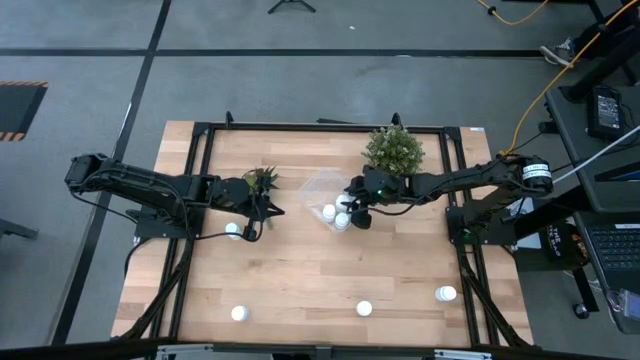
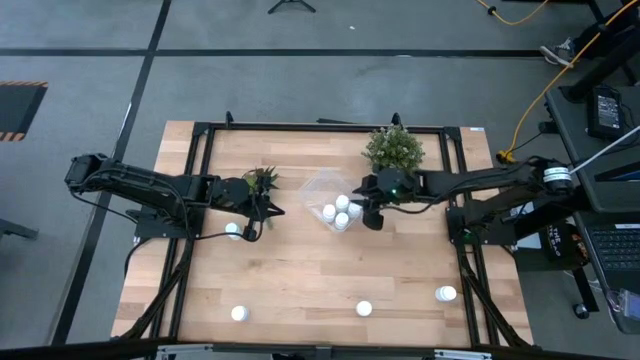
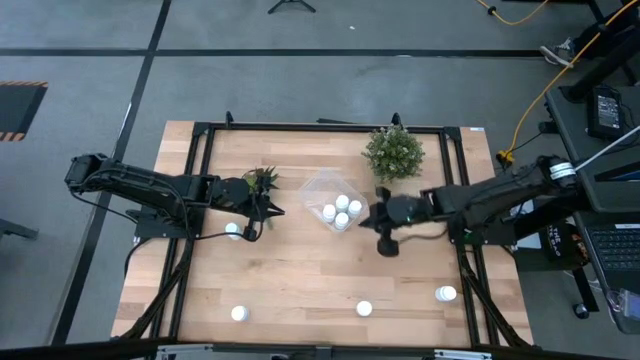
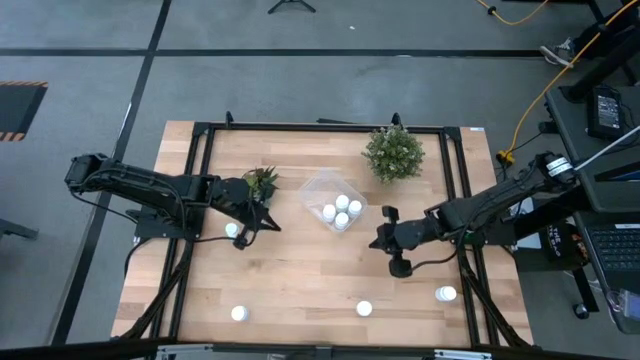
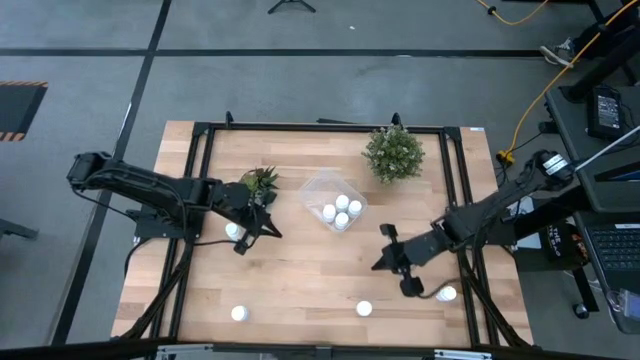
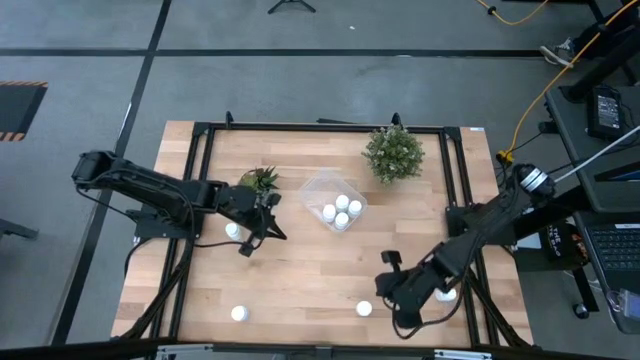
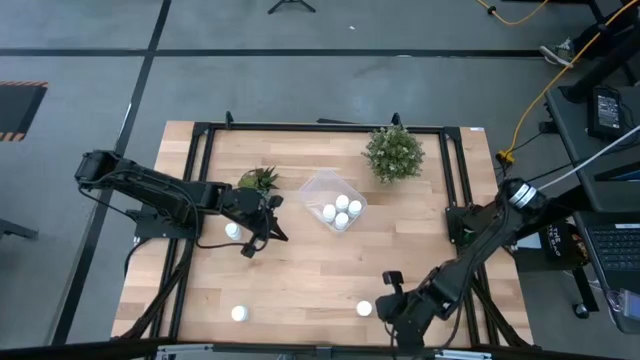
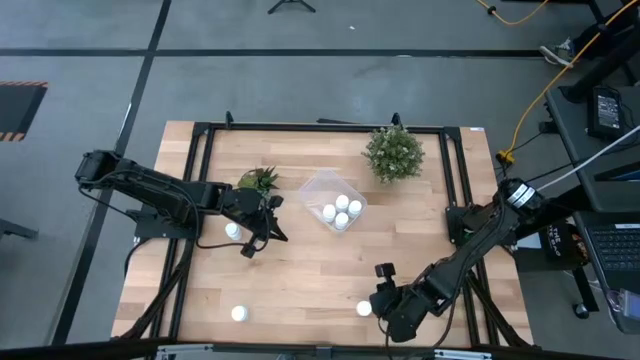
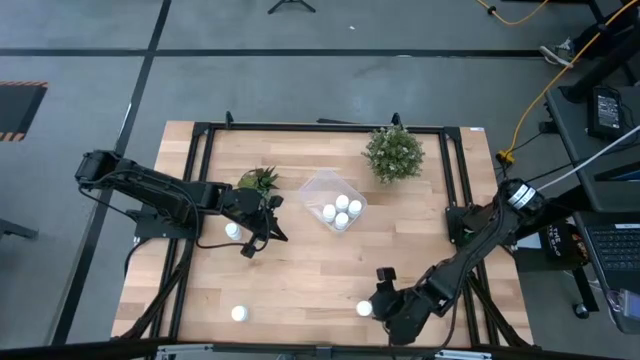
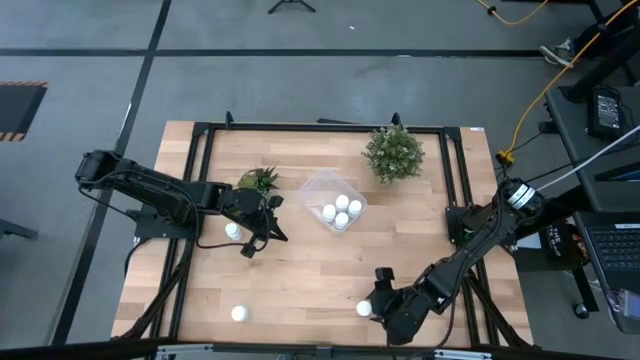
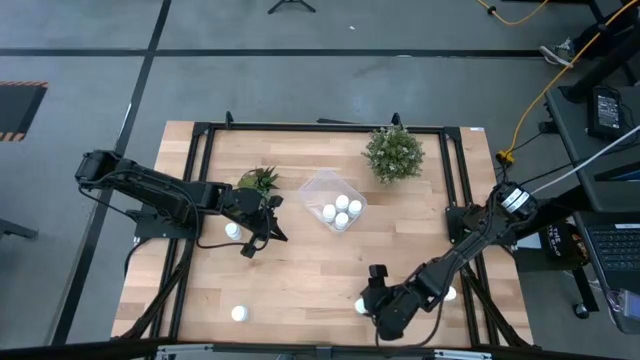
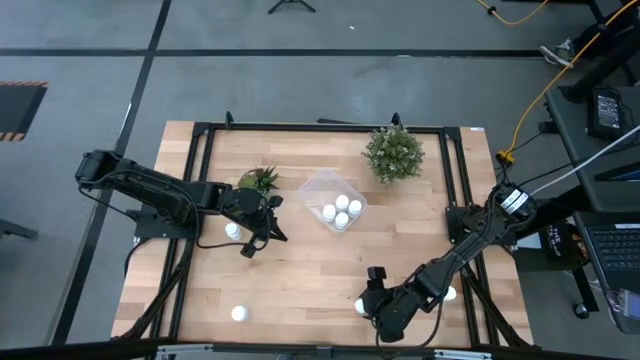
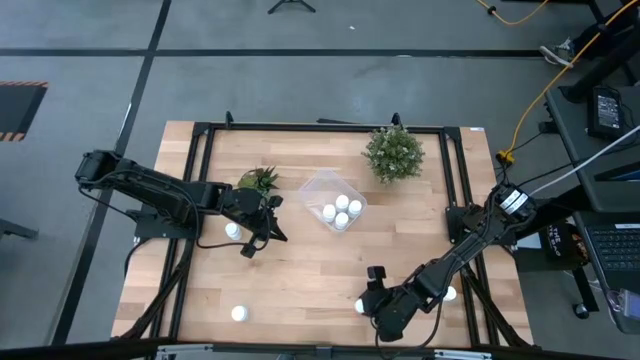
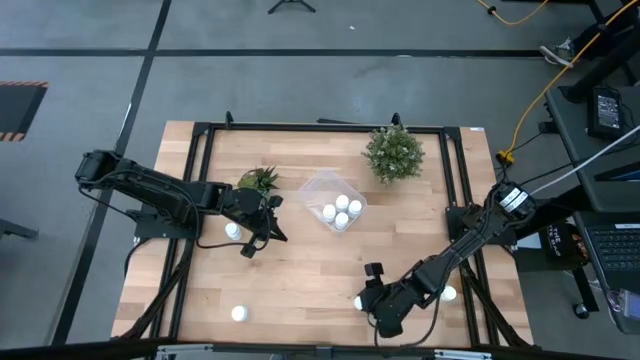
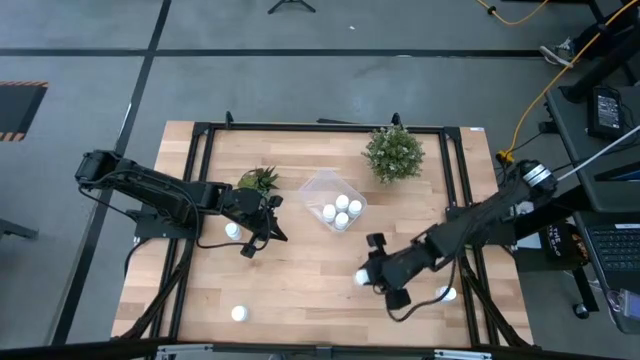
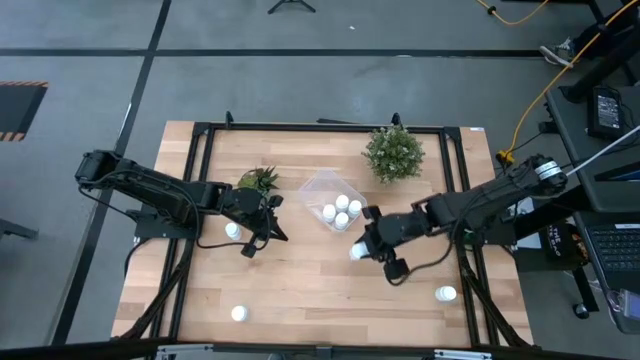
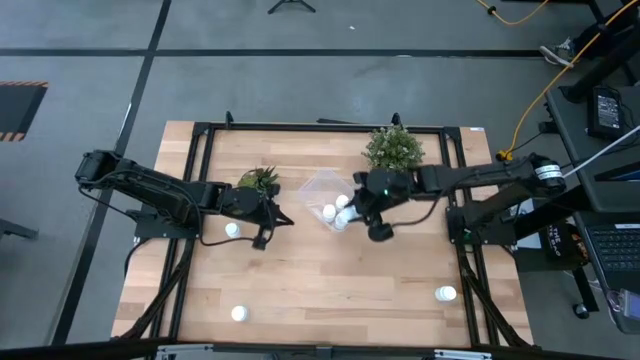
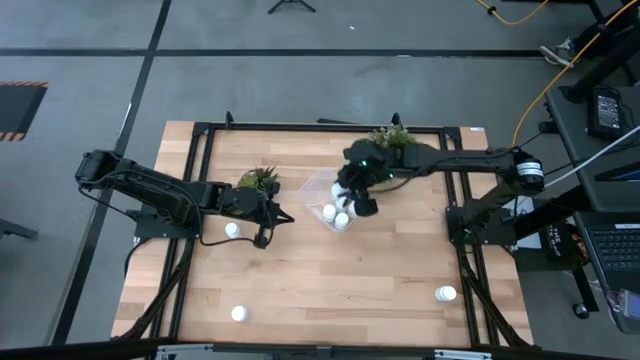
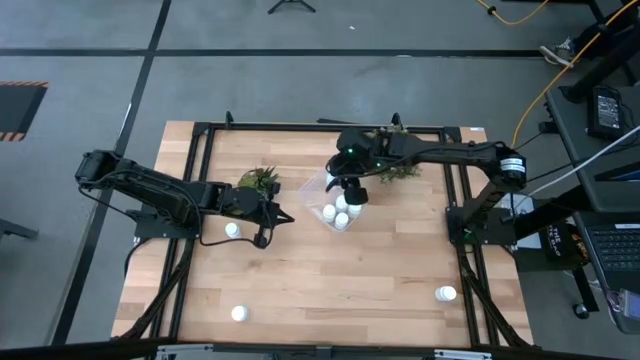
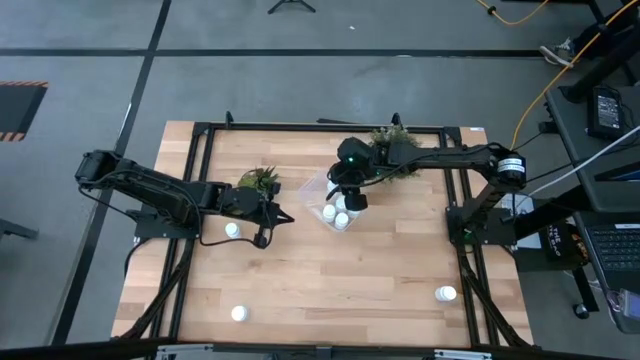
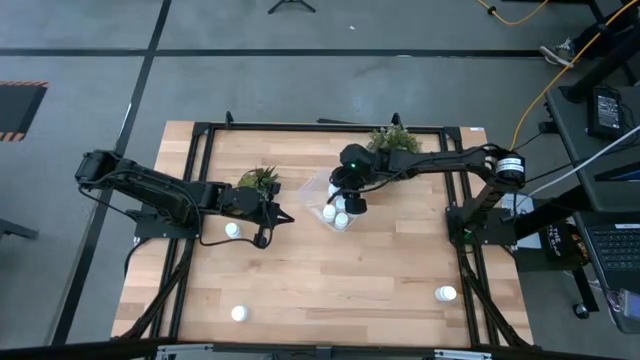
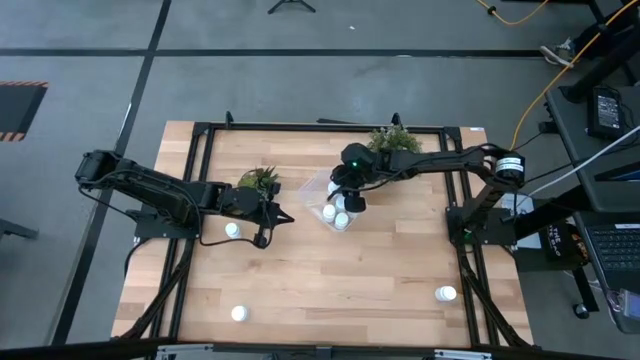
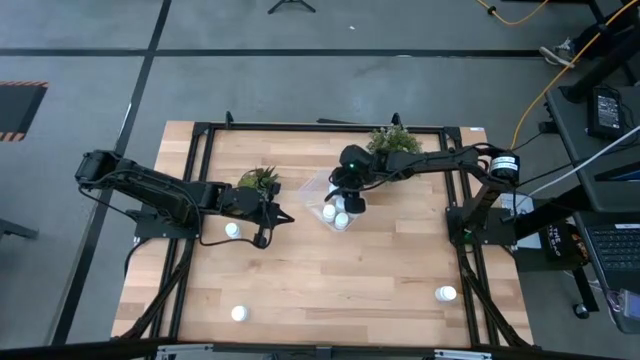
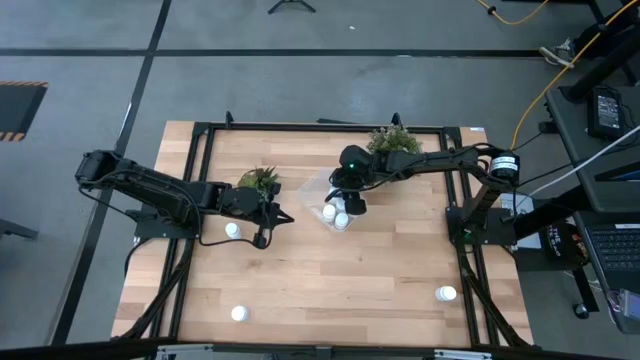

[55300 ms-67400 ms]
Task: Pick and place pill bottles into a basket
Put the pill bottle into the transparent bin

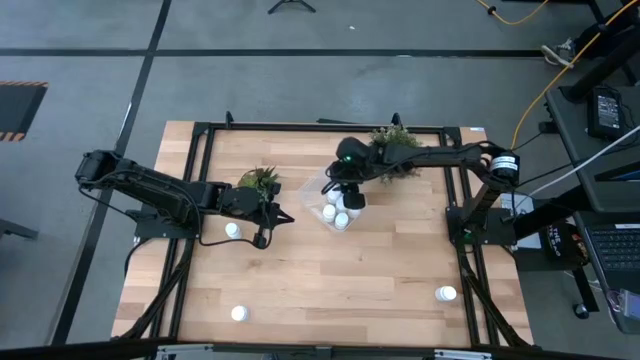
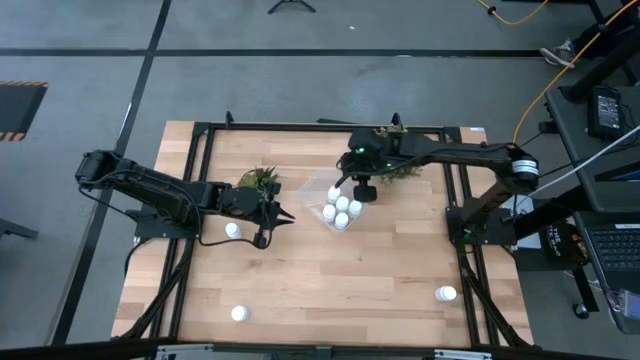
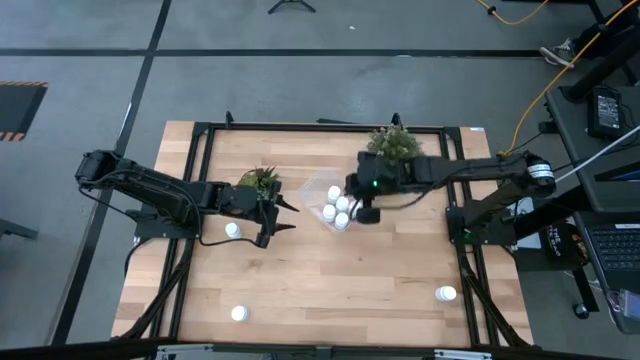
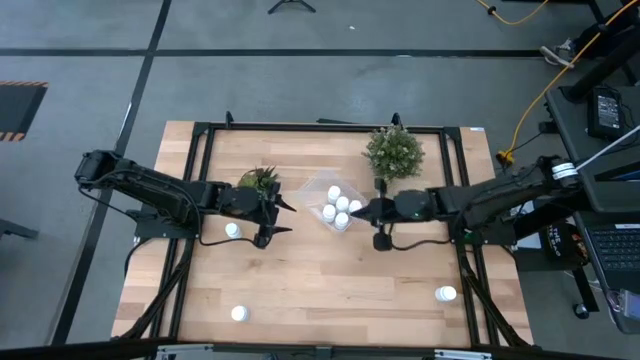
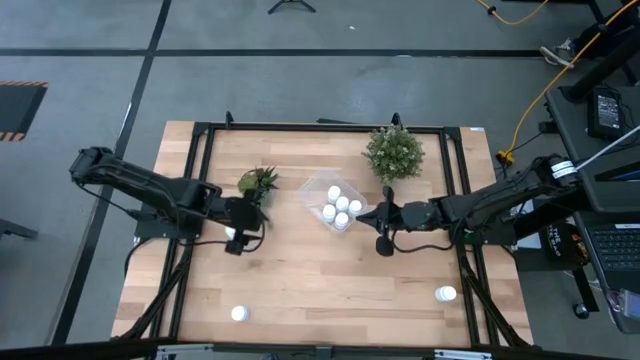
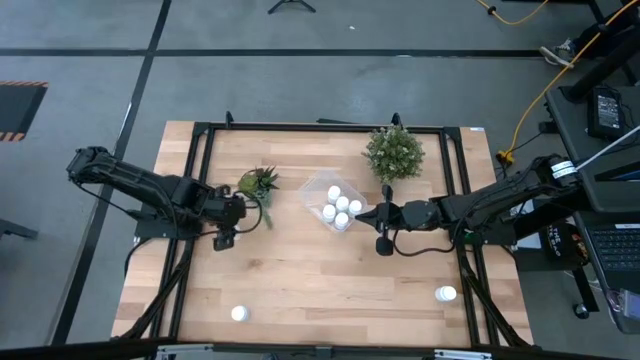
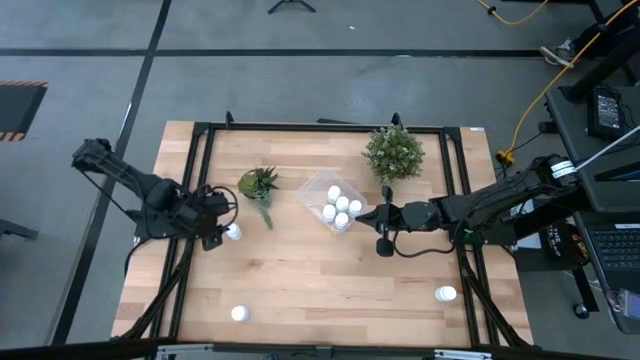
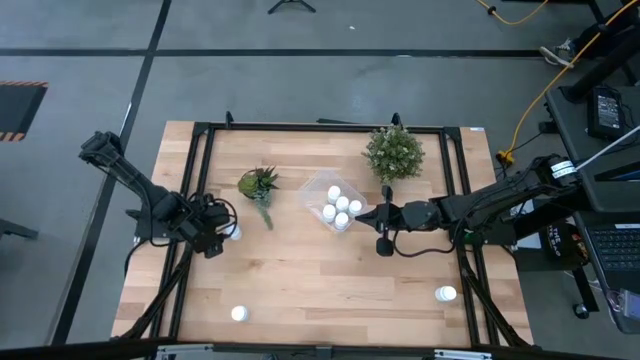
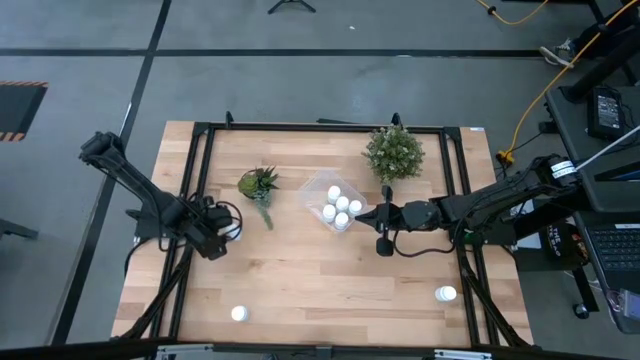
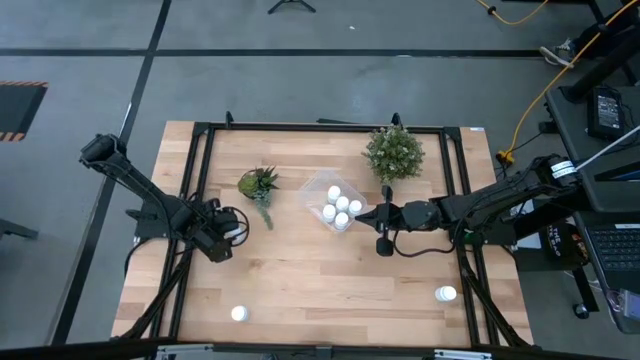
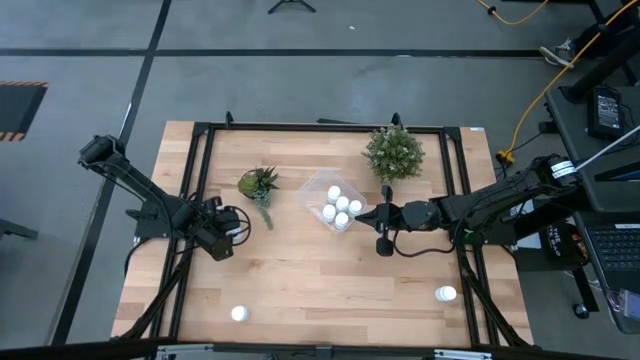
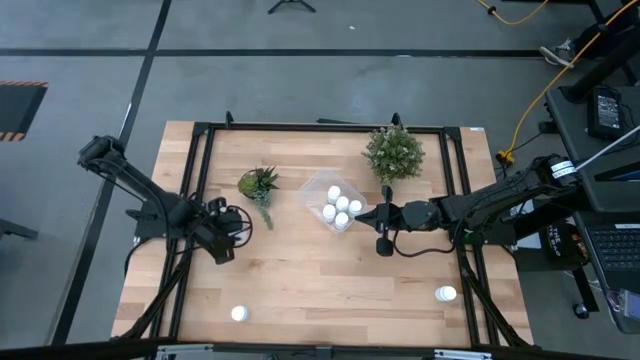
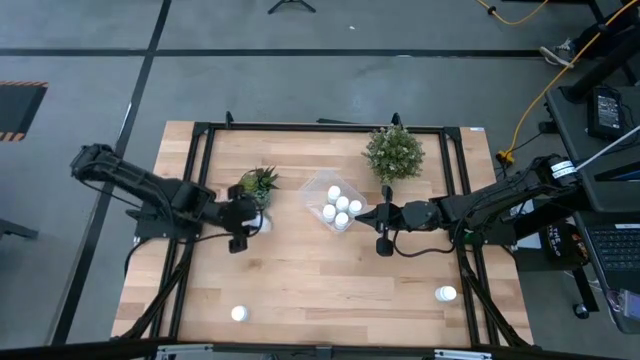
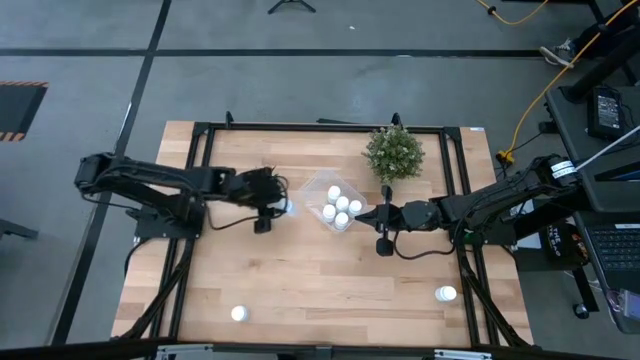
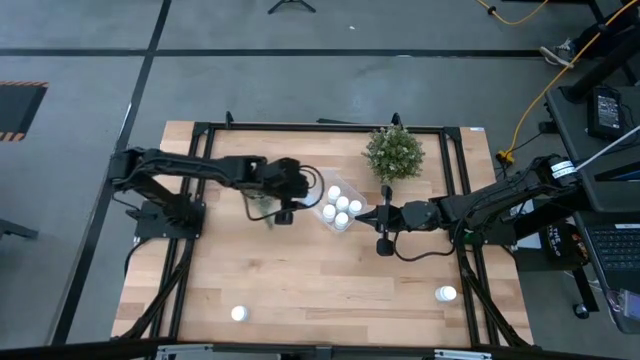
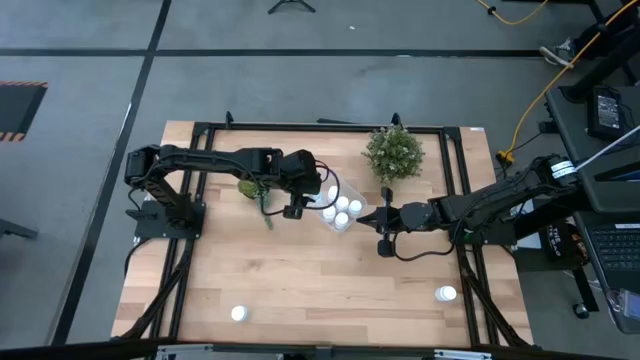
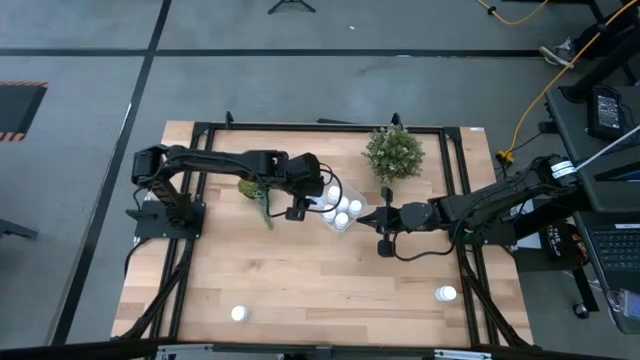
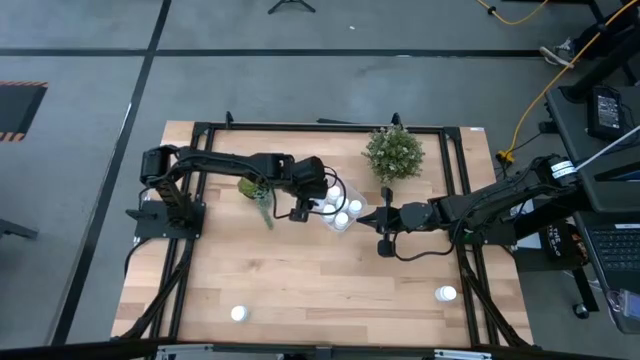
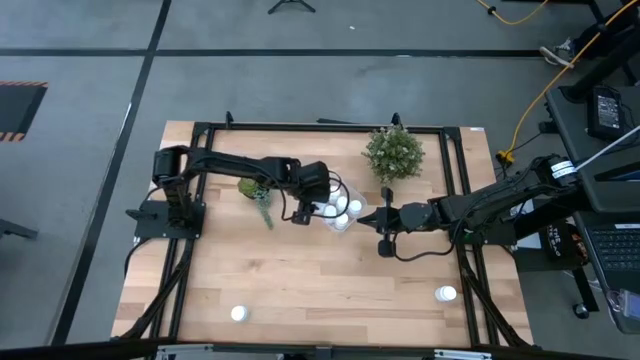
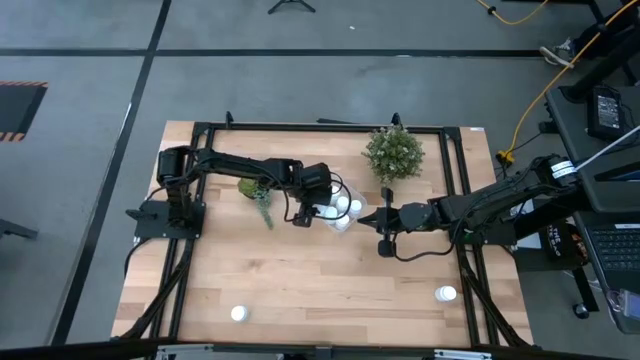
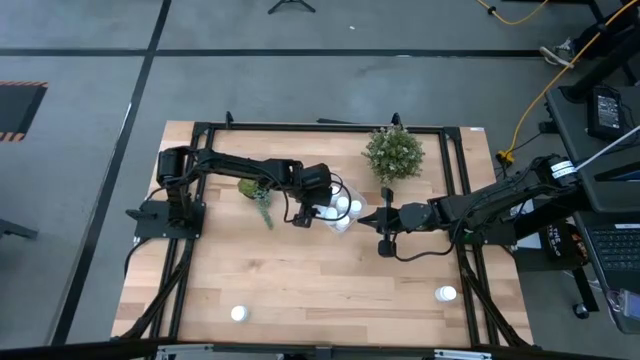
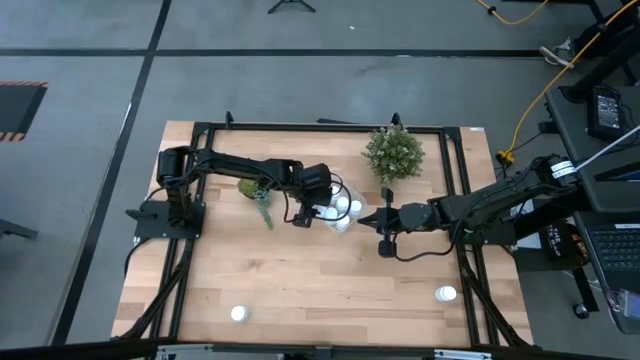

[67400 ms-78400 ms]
Put the top left pill bottle into the transparent bin
